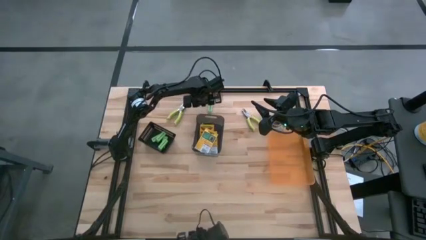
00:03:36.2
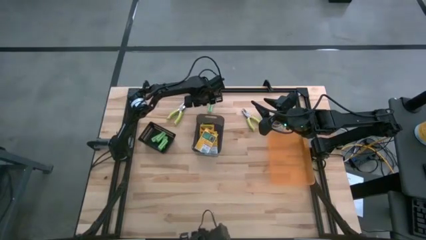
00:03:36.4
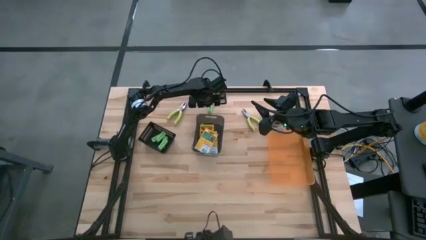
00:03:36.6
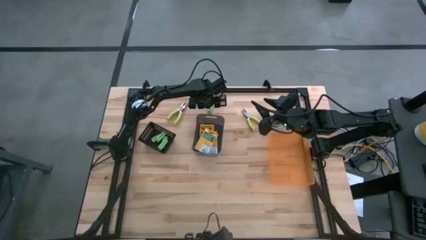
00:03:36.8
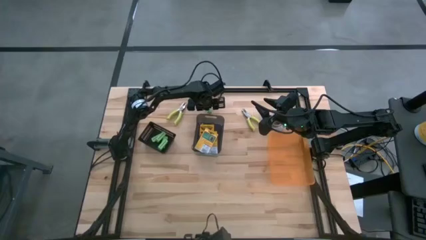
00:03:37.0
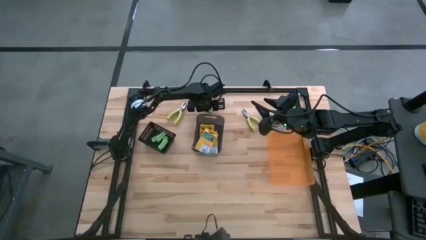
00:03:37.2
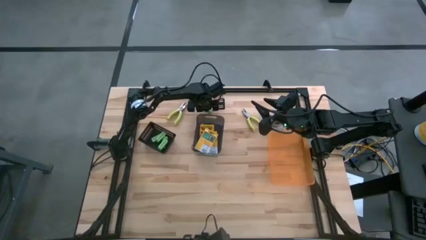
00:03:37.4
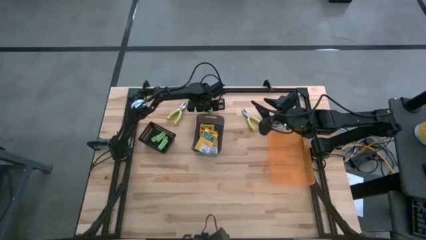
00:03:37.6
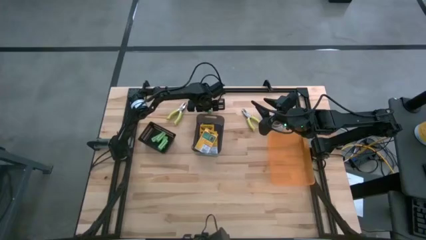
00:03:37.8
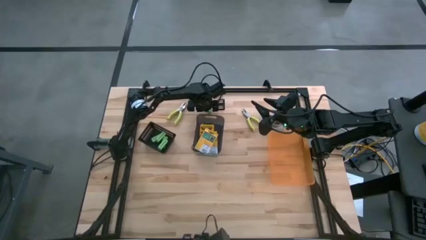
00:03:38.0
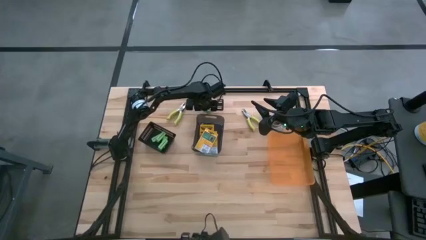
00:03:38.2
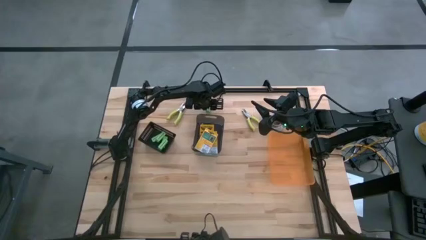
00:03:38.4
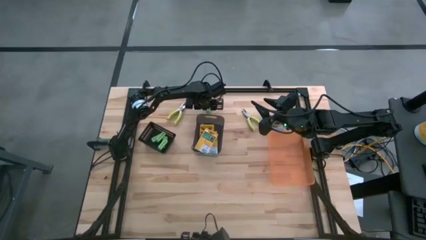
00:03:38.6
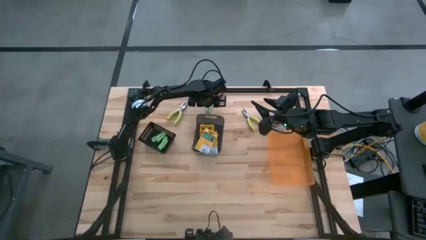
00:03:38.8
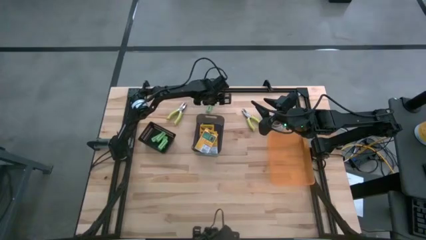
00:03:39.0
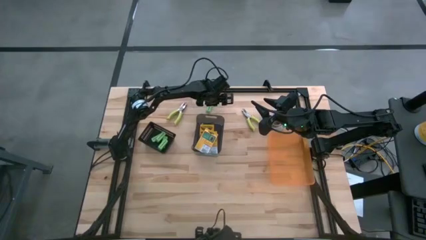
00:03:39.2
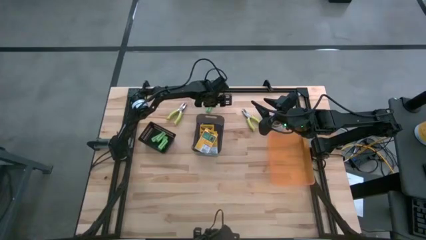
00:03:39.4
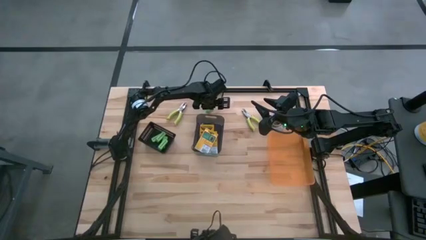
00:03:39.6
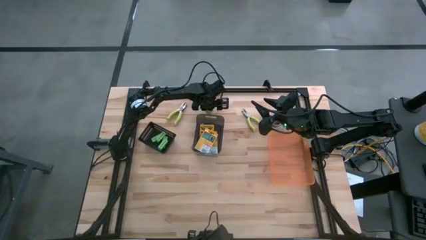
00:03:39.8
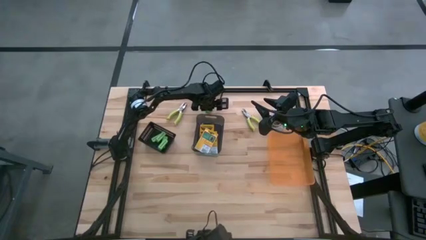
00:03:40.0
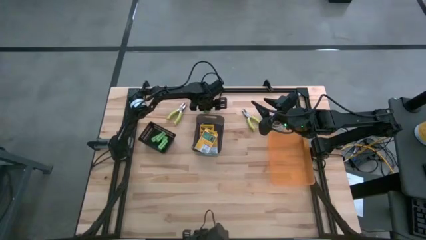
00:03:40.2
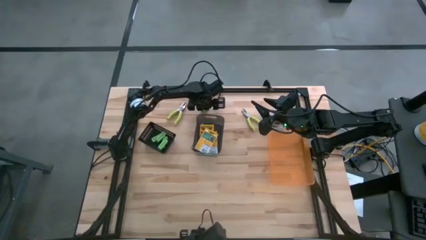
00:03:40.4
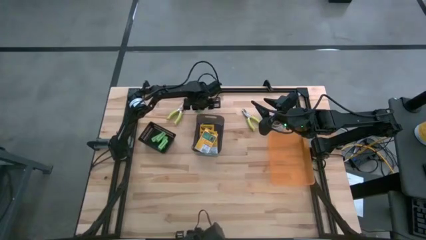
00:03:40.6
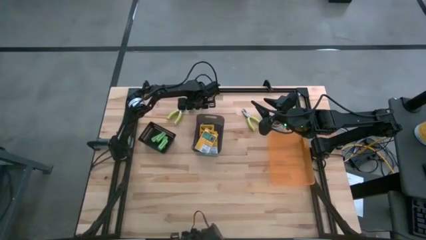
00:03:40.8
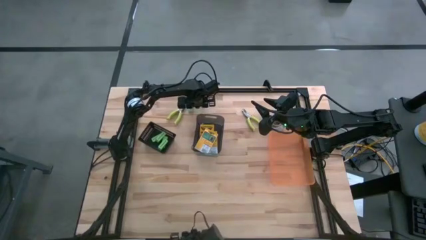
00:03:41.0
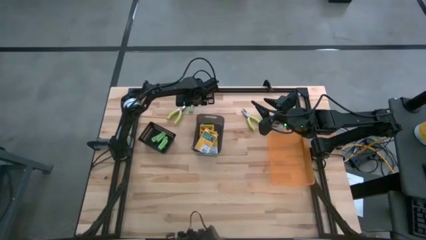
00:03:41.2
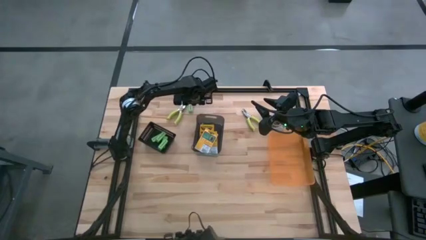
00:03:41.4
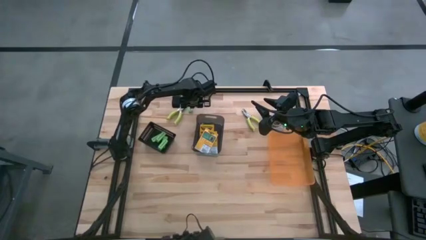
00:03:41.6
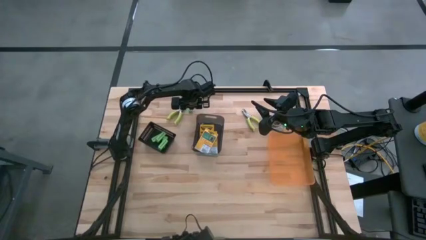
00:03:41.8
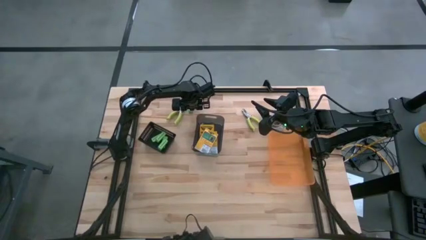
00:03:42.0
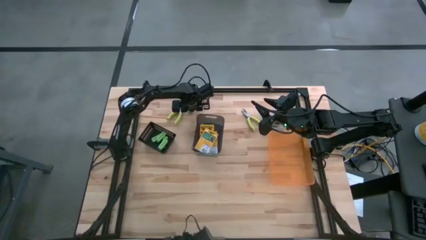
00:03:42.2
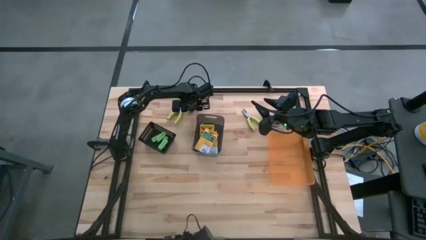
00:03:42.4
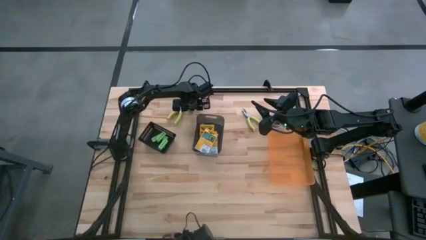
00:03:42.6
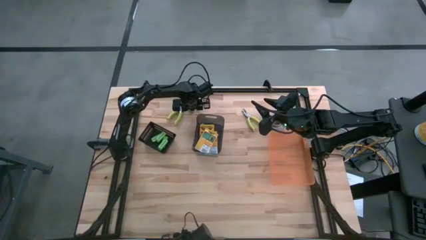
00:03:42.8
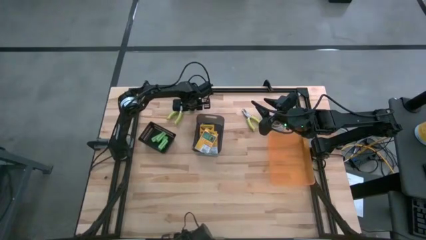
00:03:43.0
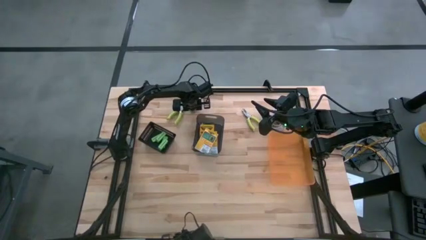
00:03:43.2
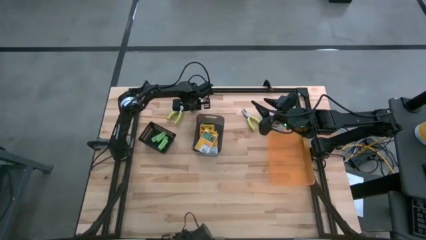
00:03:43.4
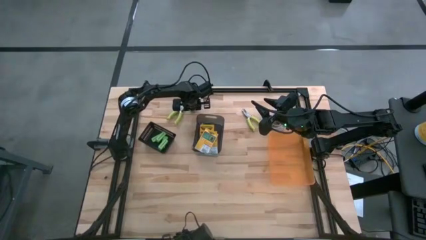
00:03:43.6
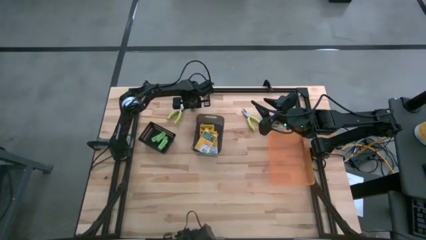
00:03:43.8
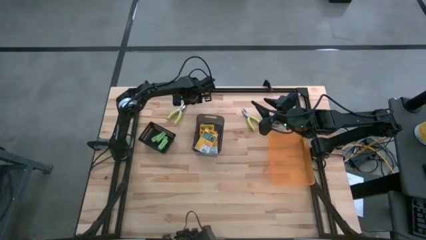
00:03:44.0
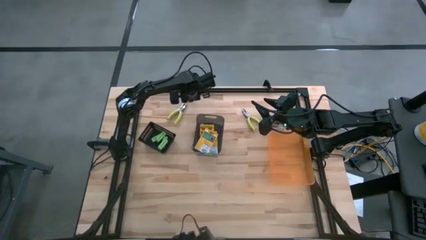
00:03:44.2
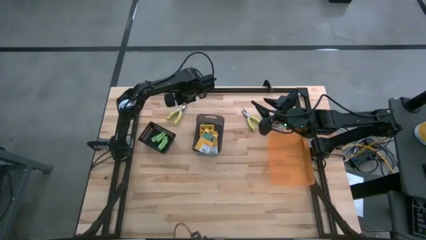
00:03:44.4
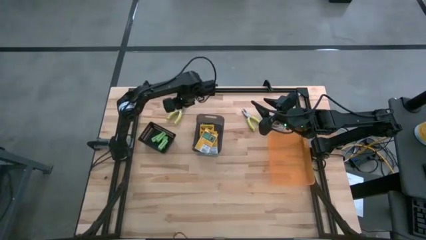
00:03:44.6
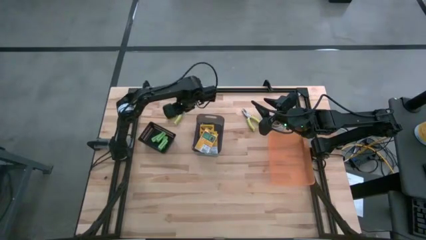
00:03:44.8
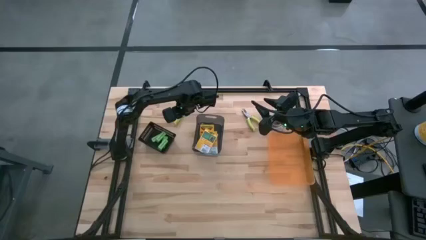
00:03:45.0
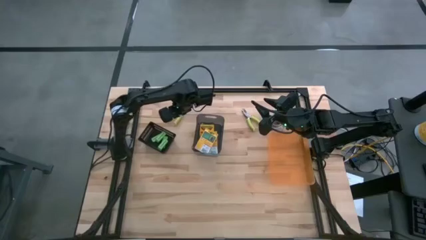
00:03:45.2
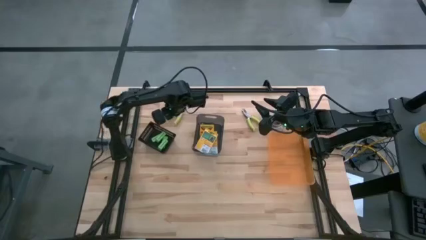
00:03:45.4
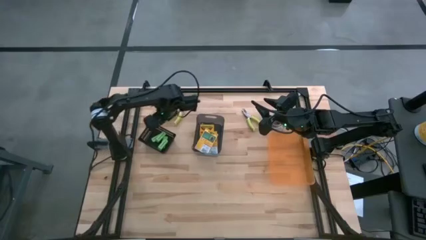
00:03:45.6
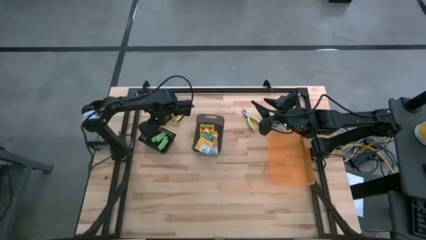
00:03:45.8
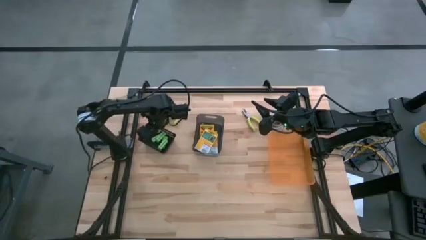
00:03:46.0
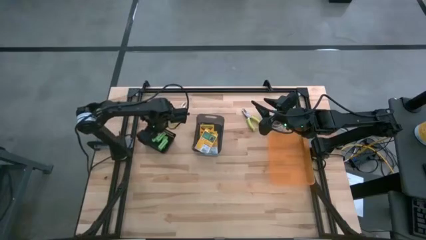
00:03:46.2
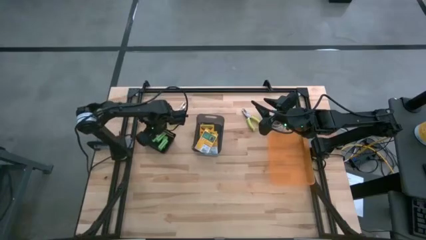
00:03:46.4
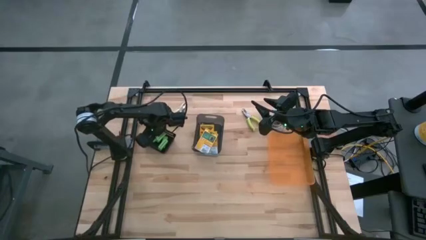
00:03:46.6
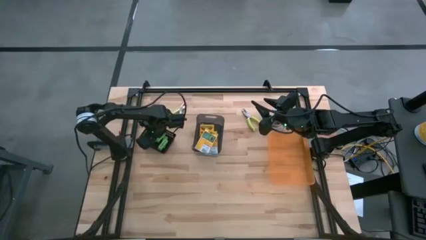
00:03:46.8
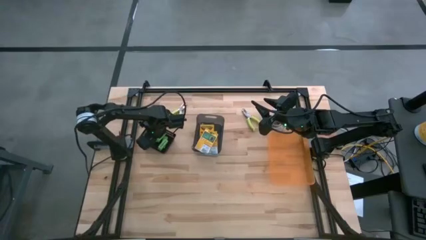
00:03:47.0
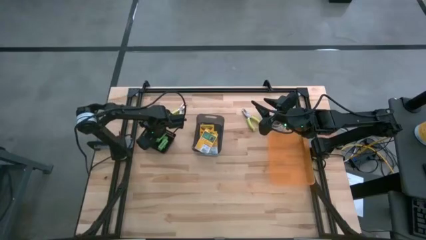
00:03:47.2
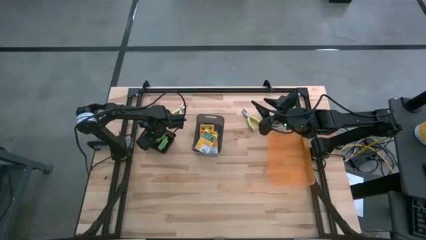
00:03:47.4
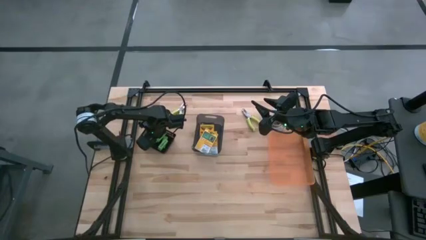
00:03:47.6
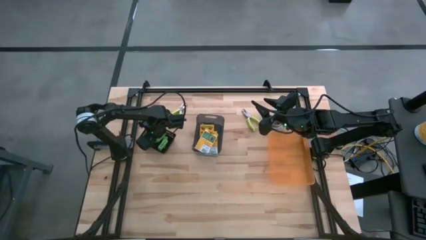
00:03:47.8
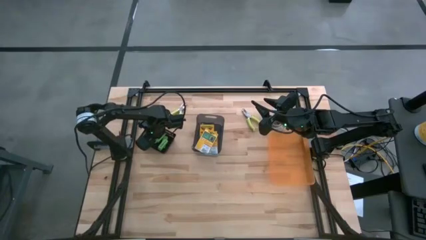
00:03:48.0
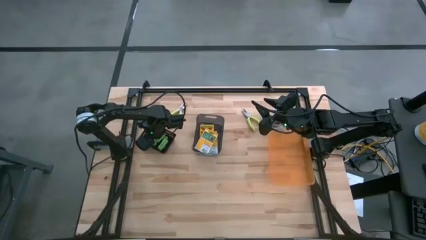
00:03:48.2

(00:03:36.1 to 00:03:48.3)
Task: Pick & Place School Supplies
Put the light green eraser into the black bin

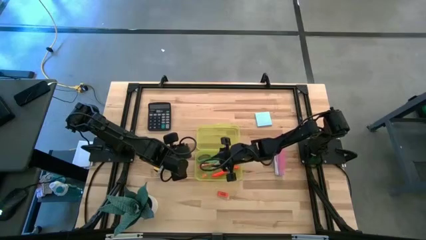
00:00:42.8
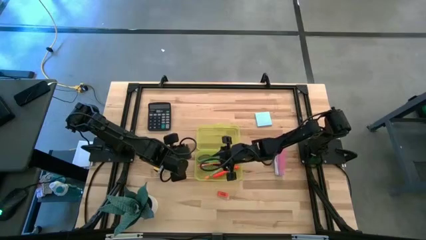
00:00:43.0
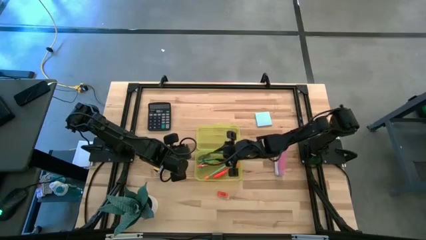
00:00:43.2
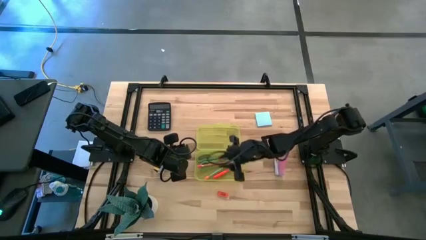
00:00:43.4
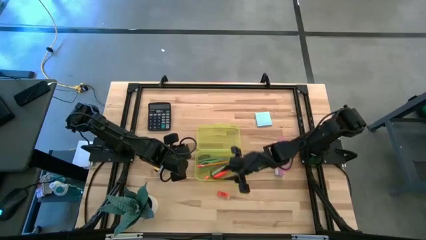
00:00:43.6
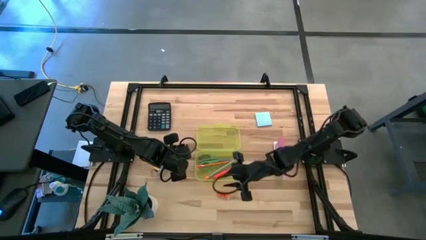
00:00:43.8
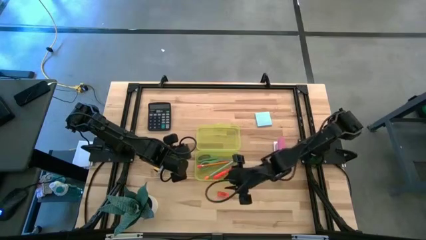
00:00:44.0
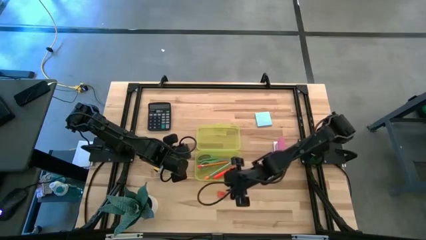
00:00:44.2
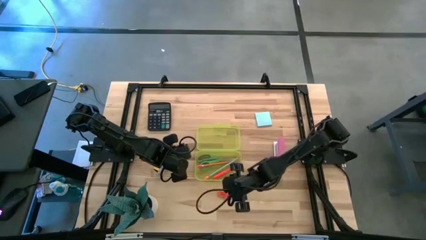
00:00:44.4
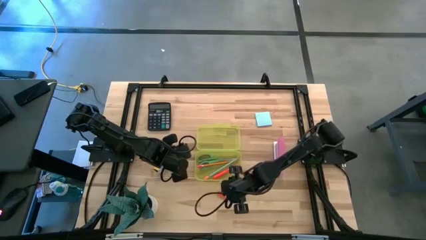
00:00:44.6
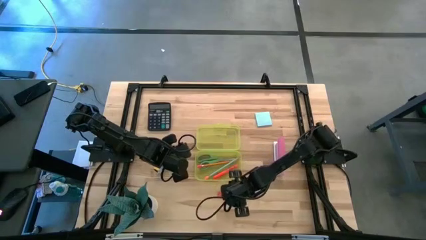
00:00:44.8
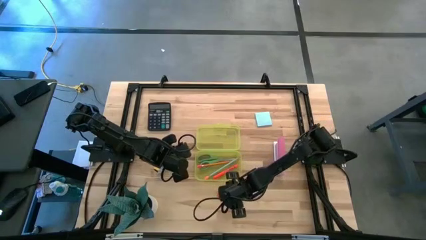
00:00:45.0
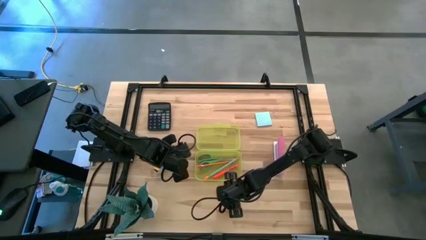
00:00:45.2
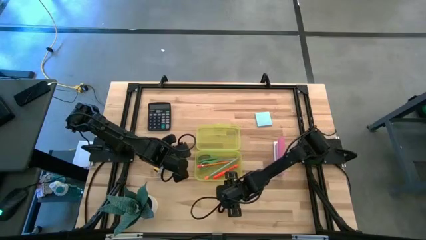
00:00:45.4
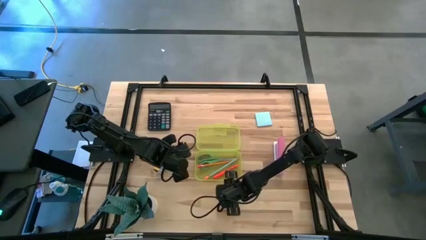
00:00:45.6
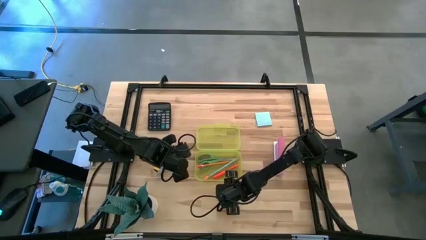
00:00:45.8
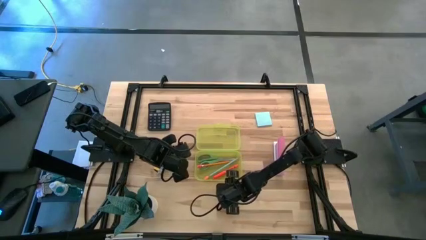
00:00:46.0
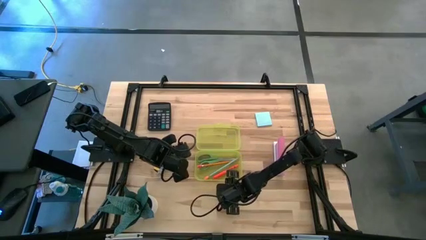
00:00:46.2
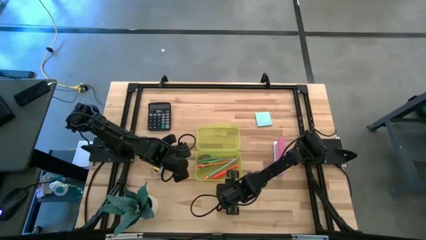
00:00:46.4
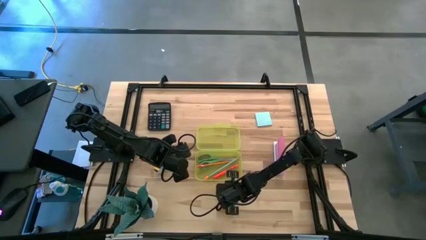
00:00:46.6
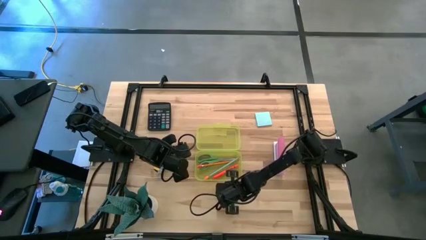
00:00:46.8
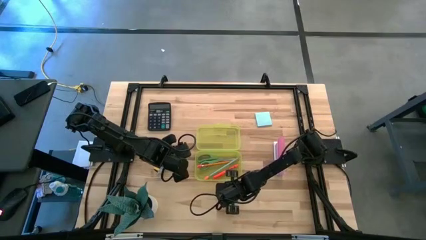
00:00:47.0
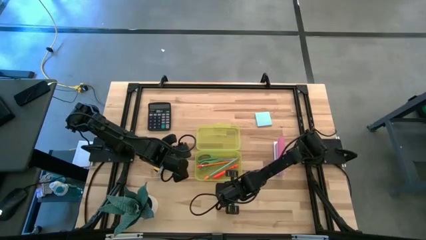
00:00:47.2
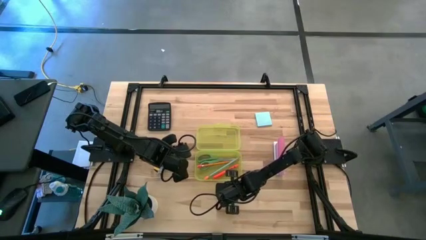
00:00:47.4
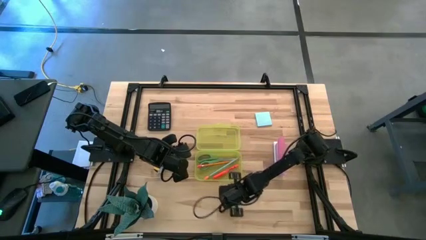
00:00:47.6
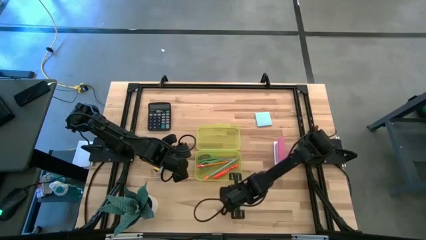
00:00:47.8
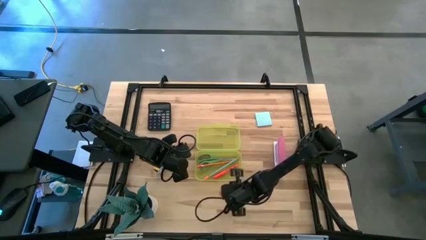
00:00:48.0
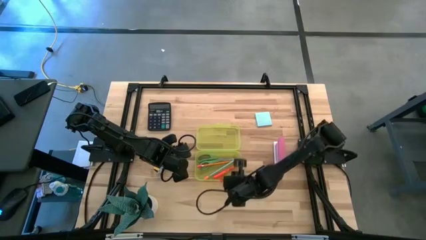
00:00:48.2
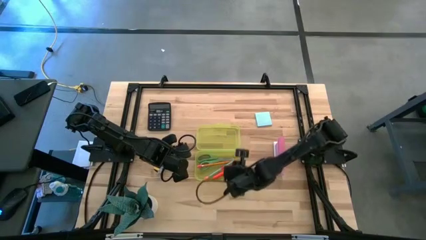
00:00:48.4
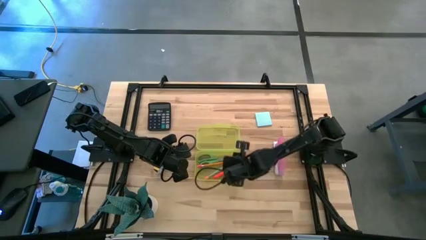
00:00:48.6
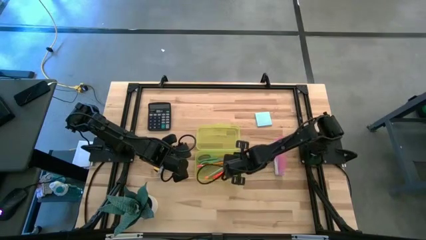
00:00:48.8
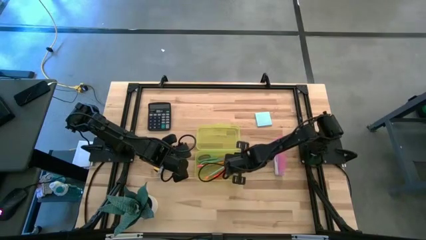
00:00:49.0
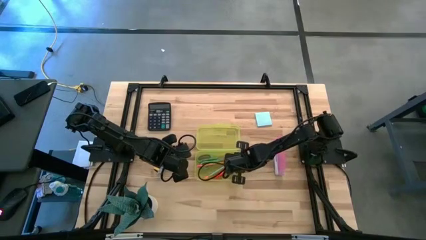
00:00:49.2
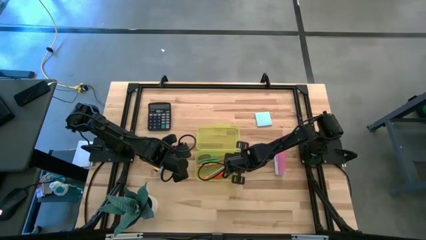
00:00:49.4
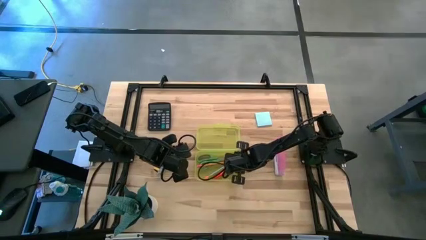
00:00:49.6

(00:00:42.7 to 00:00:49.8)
Task: Pack school essentials
Put the orange eraser into the yellow supply box
